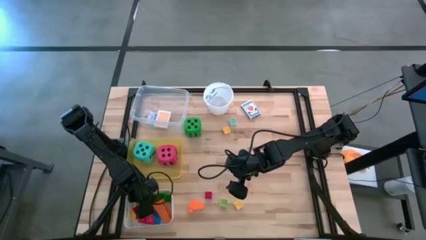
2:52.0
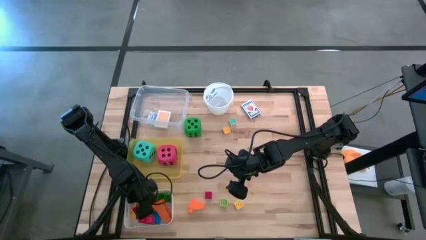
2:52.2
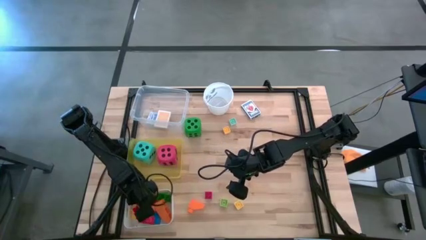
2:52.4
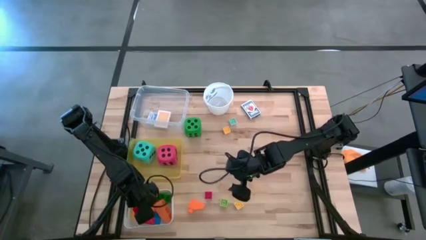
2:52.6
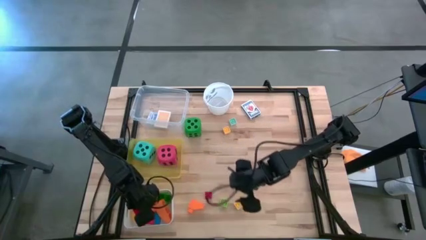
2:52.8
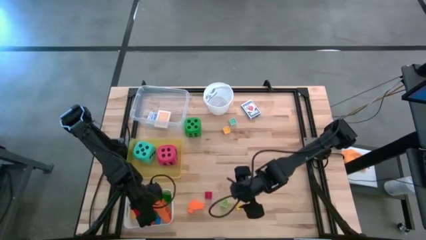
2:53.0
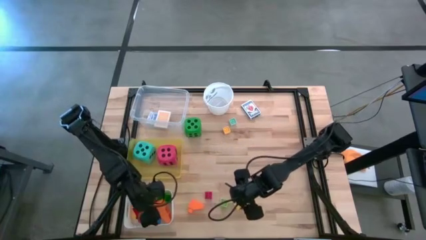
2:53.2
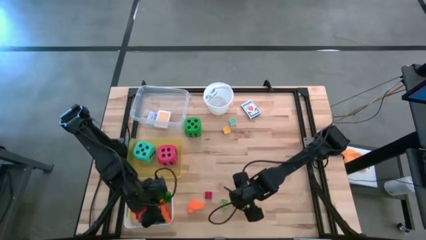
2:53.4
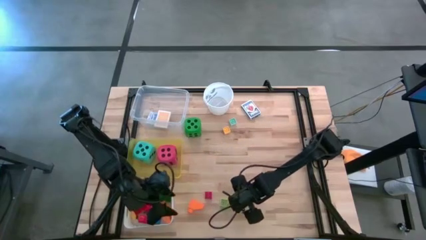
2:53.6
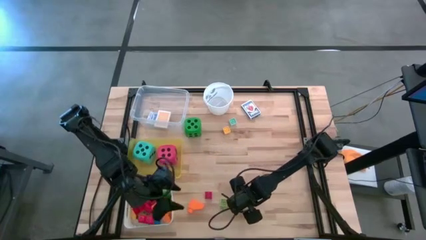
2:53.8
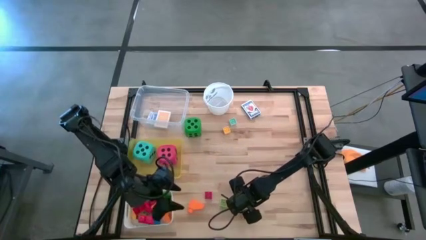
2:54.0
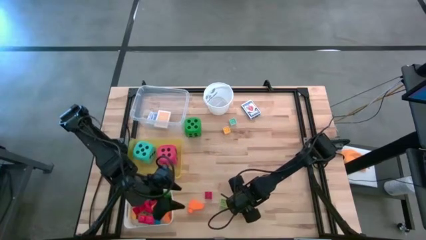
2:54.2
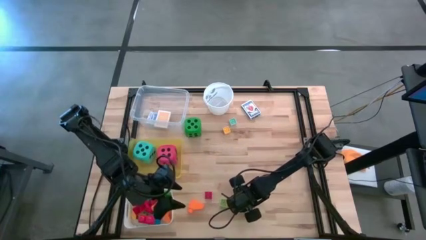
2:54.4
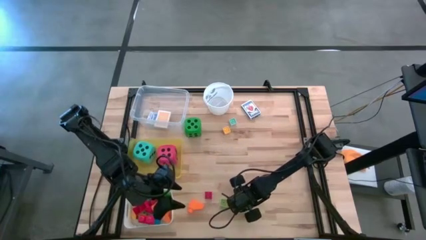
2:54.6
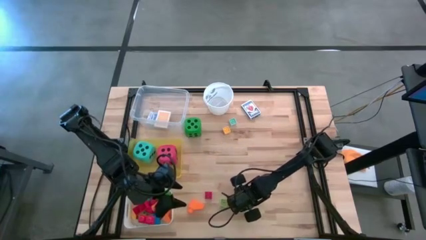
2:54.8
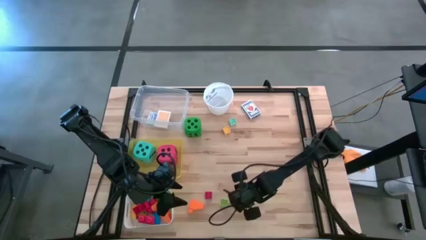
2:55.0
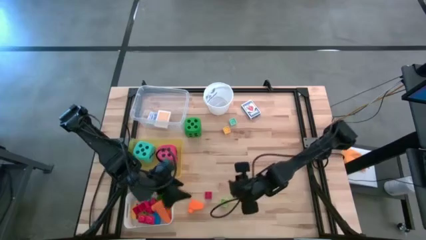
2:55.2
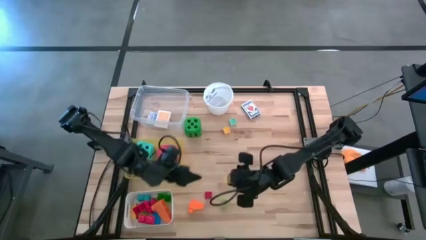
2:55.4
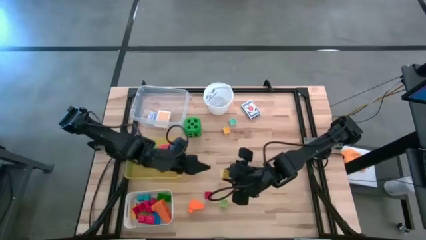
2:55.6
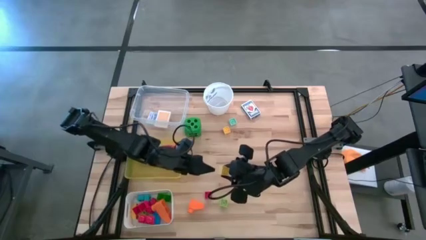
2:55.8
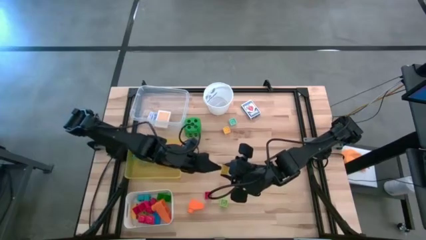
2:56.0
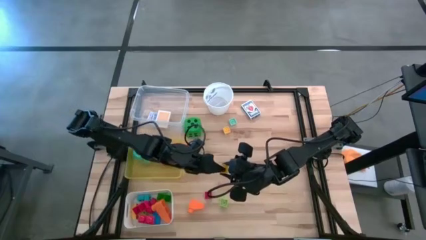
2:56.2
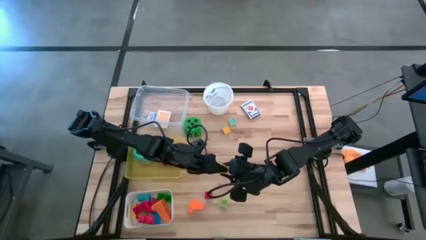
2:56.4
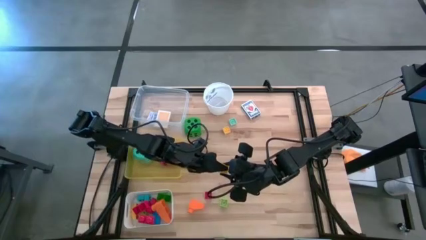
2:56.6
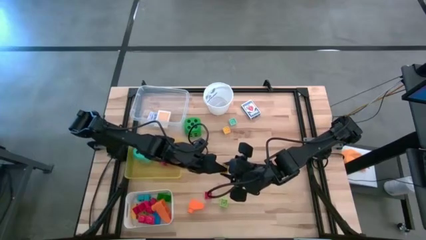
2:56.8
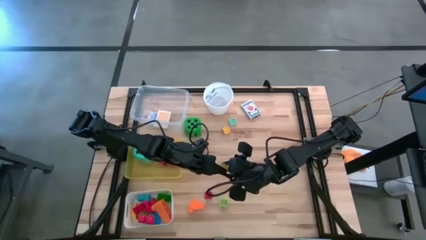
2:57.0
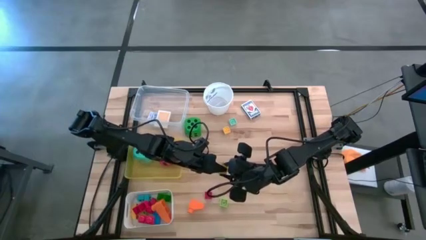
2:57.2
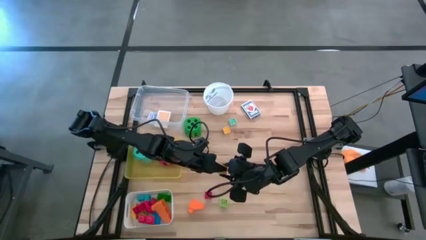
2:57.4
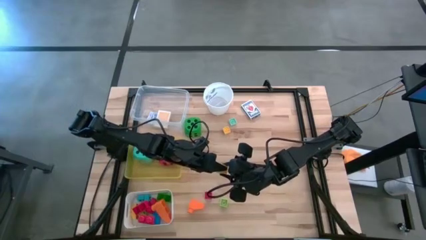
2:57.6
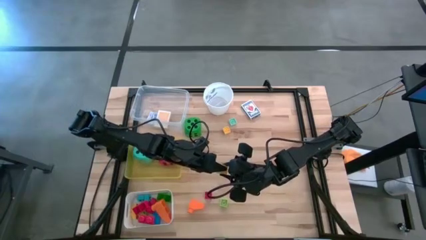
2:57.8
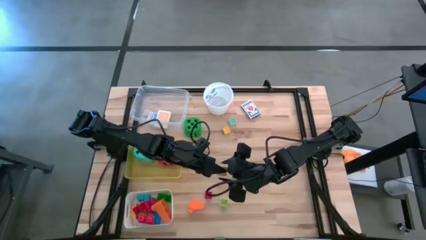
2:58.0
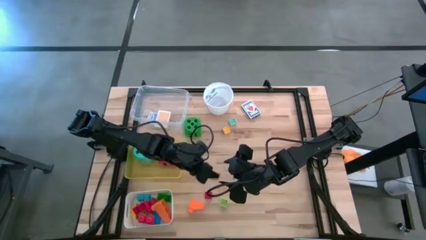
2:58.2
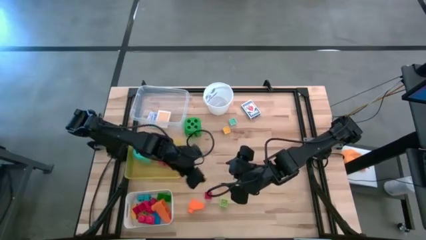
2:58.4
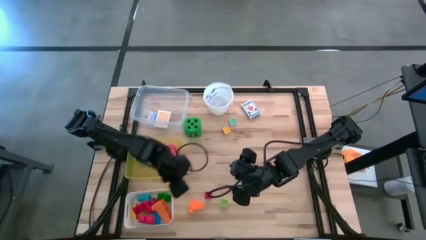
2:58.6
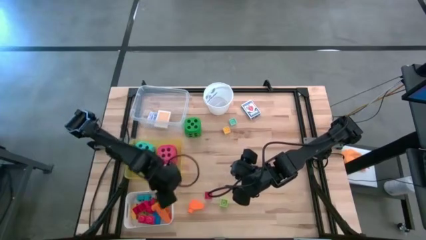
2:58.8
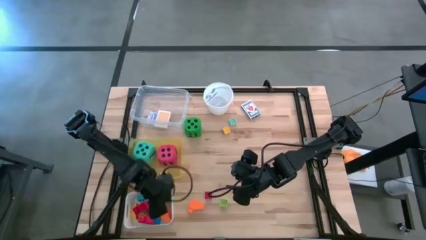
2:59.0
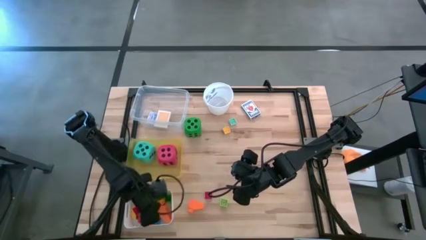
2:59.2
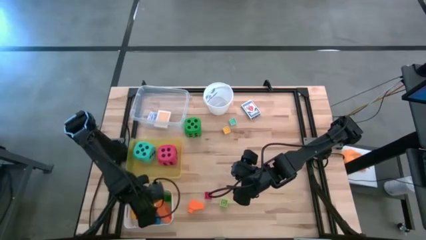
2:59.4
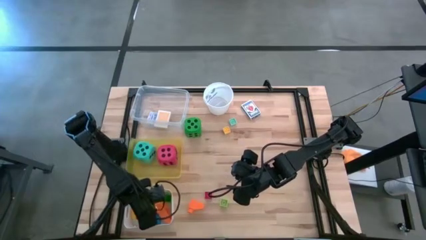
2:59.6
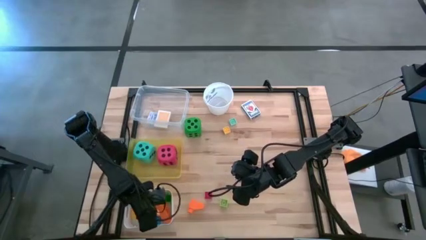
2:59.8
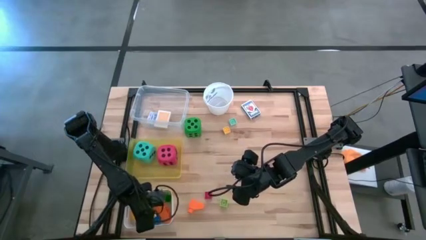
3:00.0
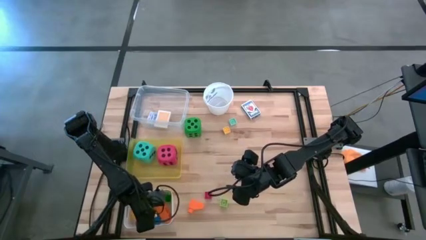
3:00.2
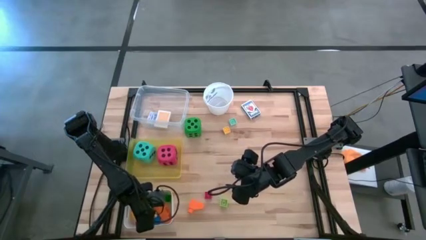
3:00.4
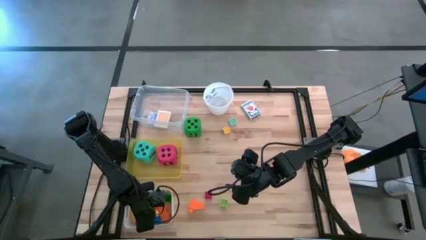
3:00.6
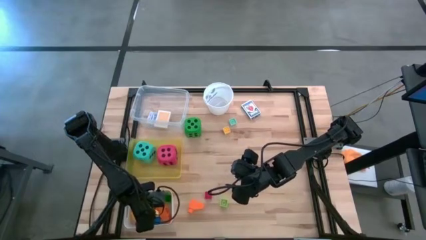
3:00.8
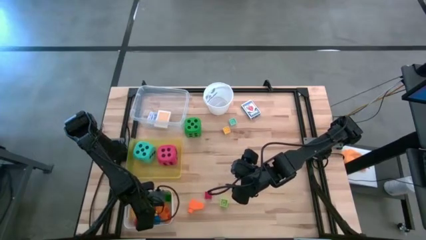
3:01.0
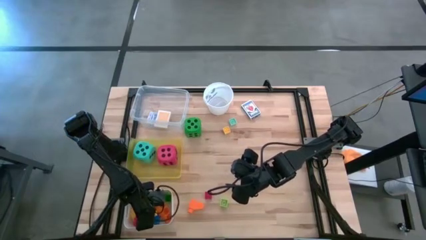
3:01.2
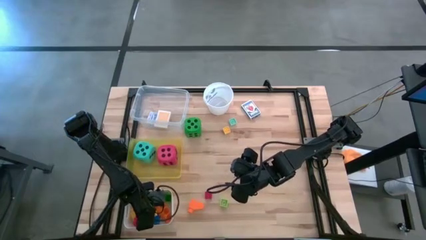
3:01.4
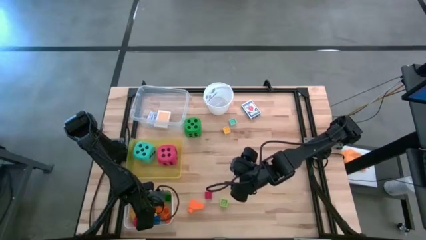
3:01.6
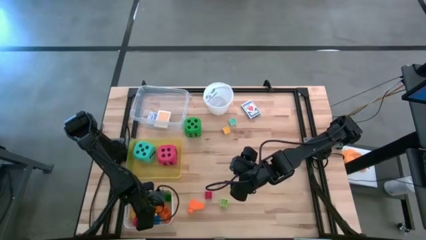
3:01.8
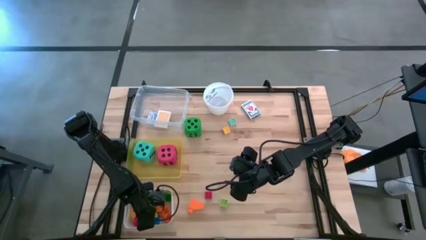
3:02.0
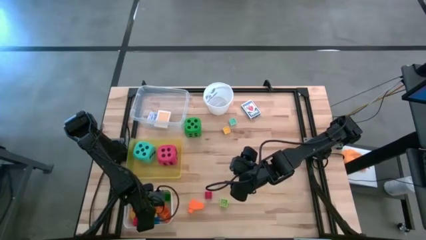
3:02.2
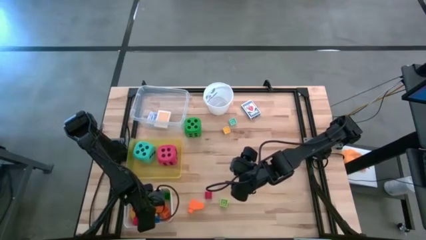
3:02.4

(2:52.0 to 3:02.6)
Task: Pick & Place Toys
Put the bottom yellow game piece into the white bin

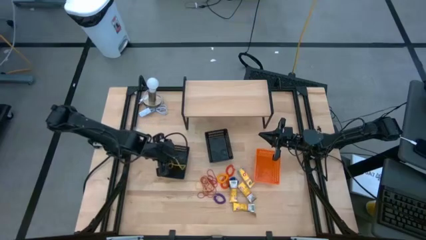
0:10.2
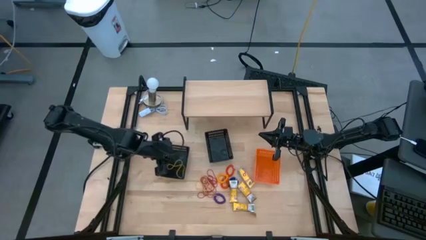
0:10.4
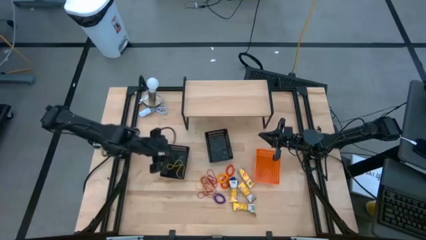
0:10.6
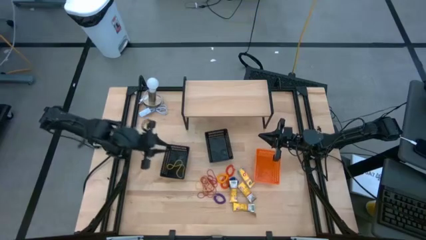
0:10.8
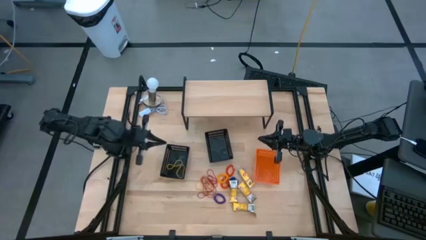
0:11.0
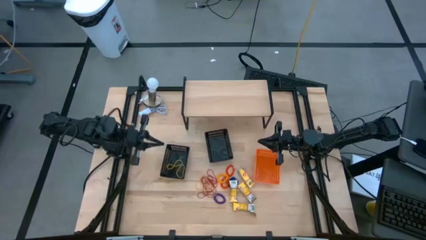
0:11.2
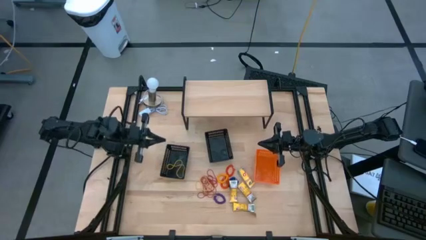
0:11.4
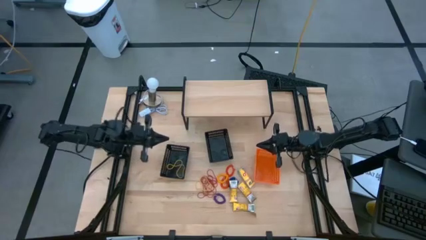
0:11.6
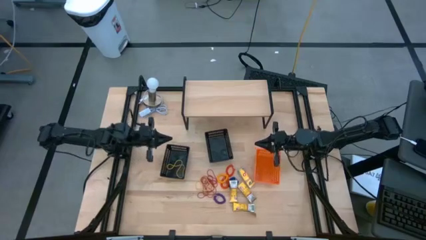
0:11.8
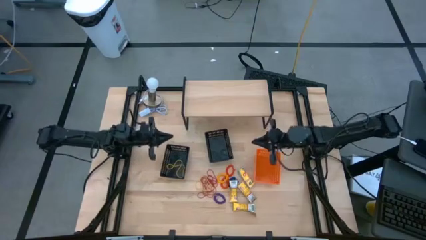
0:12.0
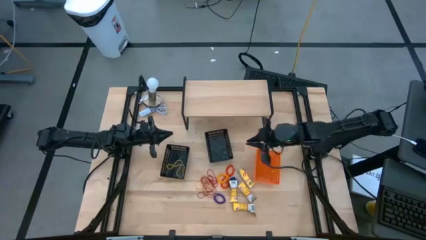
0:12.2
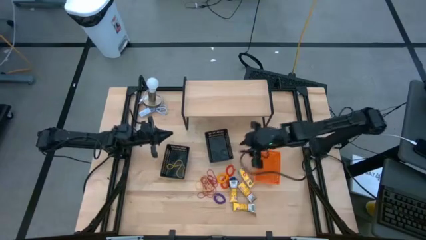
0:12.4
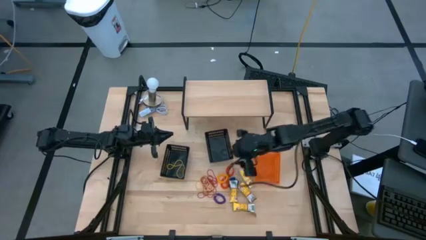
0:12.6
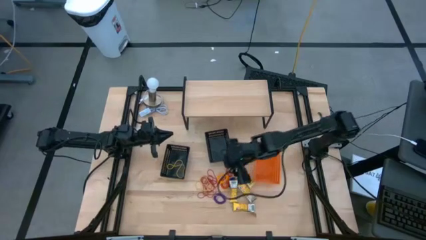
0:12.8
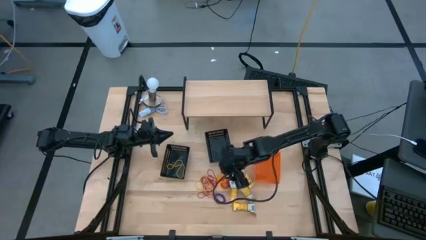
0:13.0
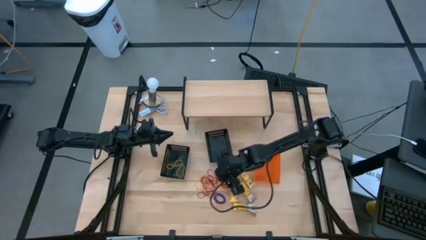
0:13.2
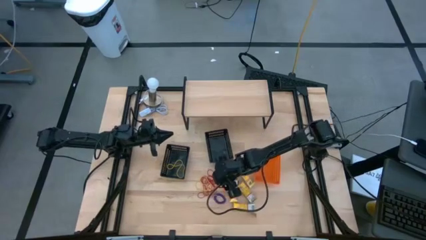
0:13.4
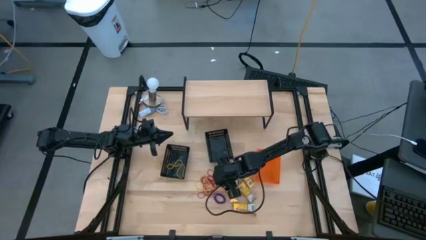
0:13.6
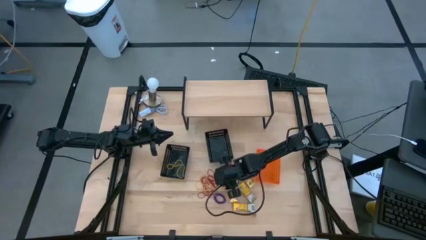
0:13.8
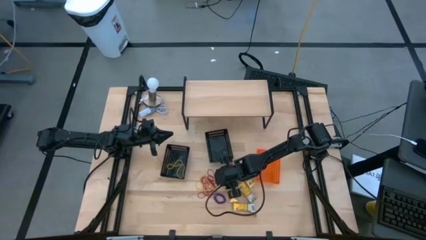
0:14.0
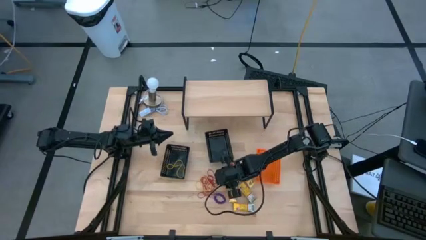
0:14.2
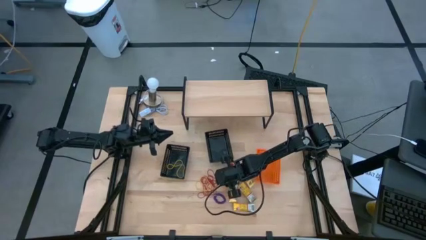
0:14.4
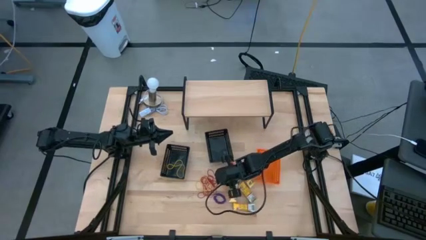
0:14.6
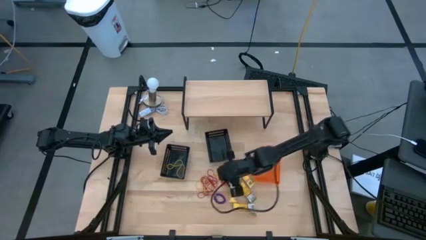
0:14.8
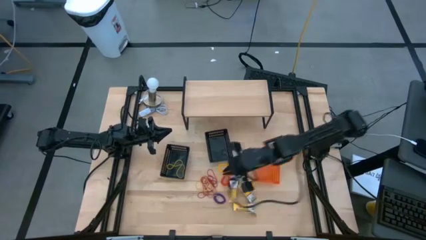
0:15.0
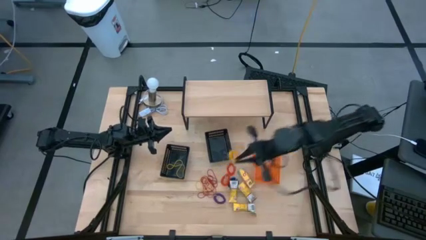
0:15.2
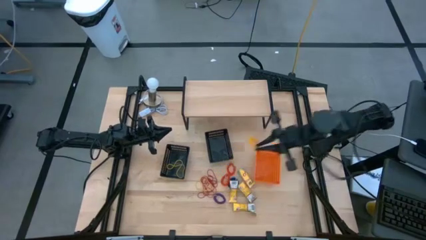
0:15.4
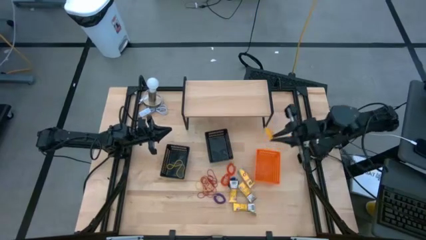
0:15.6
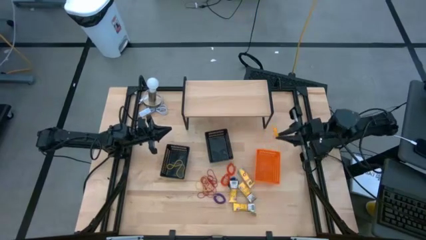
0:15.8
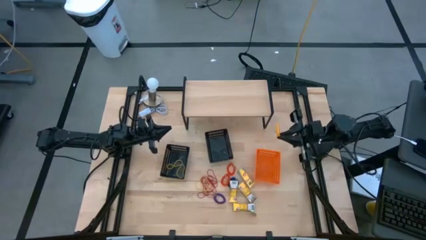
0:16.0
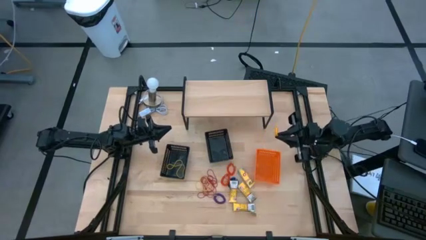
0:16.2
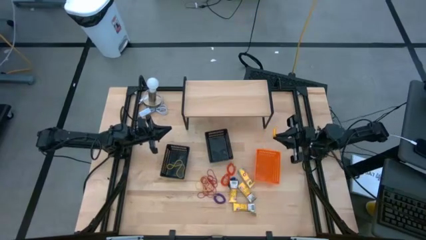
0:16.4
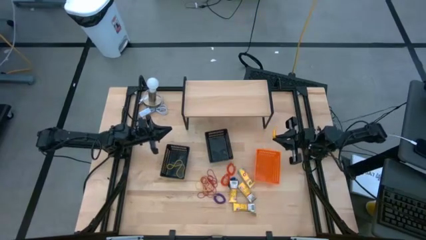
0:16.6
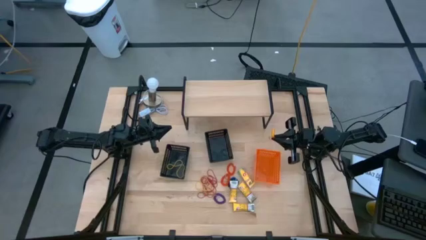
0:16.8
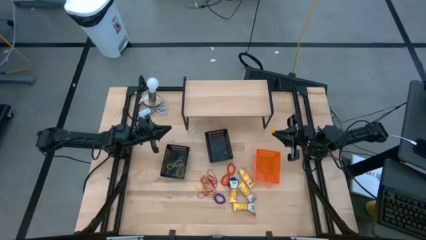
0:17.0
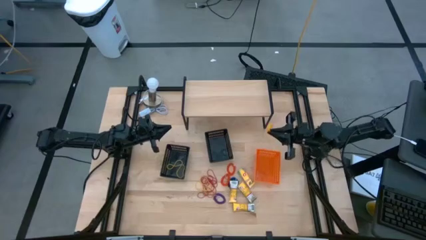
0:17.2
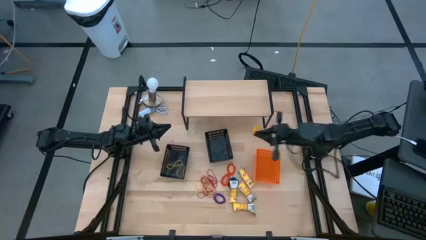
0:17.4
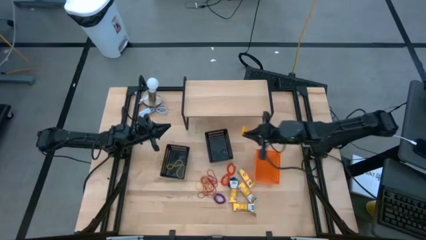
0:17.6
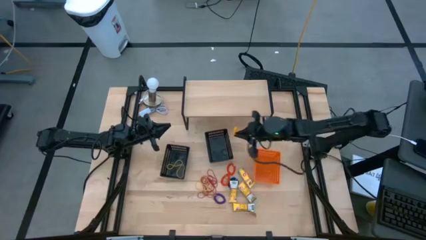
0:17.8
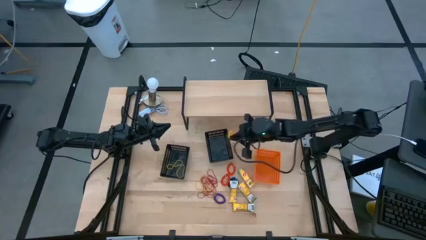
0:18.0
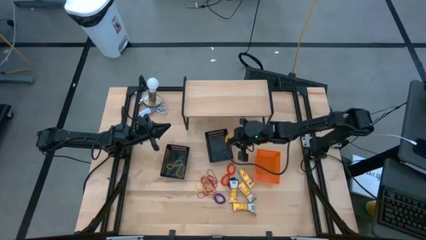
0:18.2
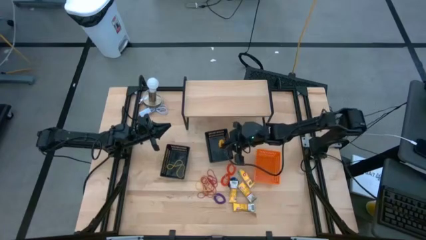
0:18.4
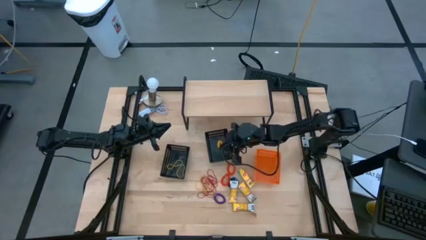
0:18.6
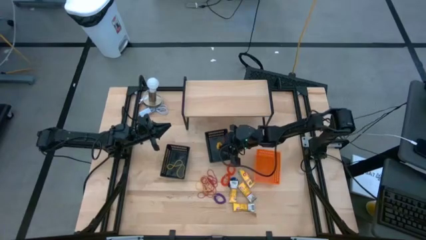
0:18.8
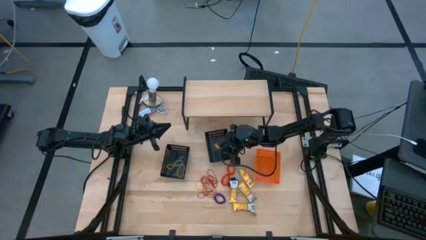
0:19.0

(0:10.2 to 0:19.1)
Task: Pick & Place Office Desk Supplies
Put the yellow spring keychain into the right black bin
